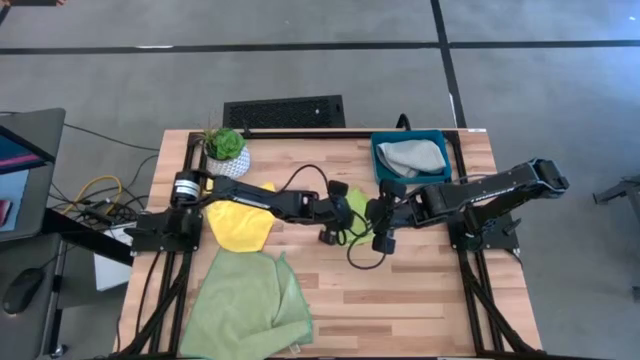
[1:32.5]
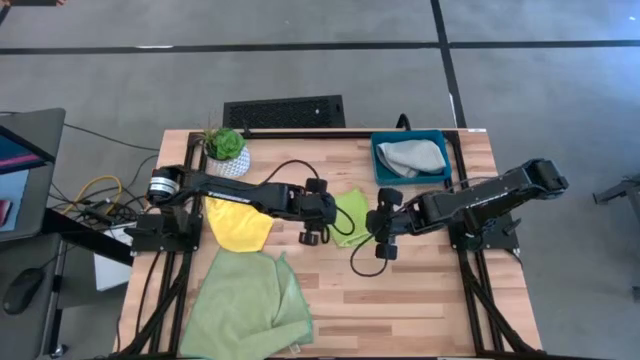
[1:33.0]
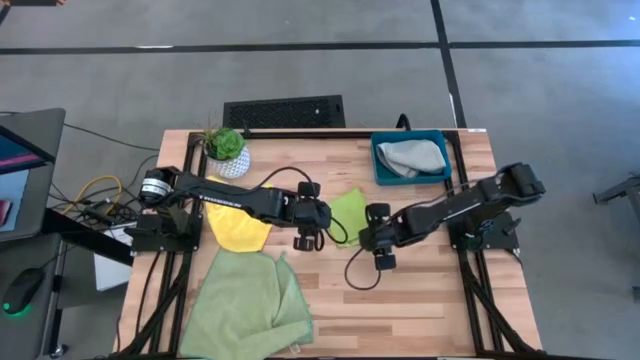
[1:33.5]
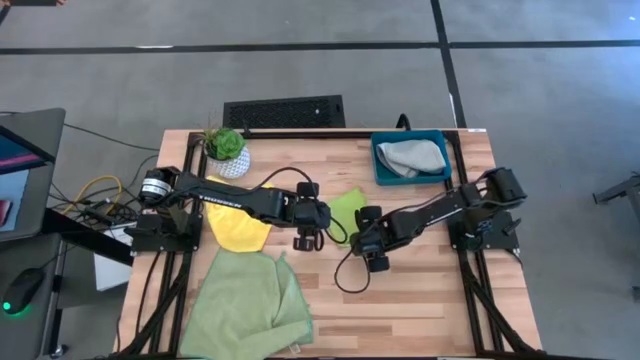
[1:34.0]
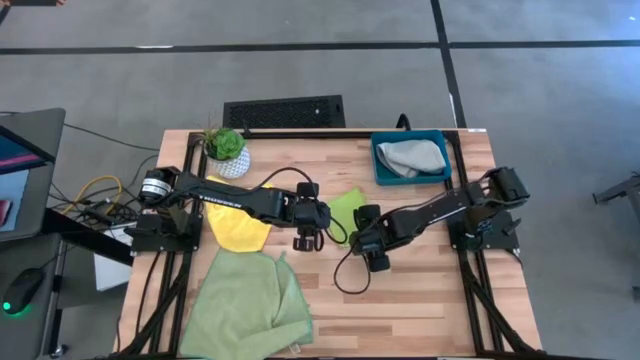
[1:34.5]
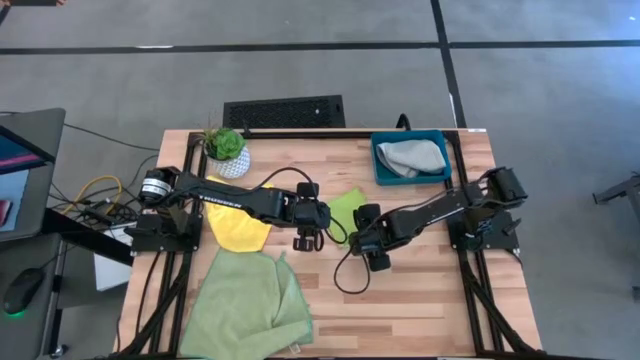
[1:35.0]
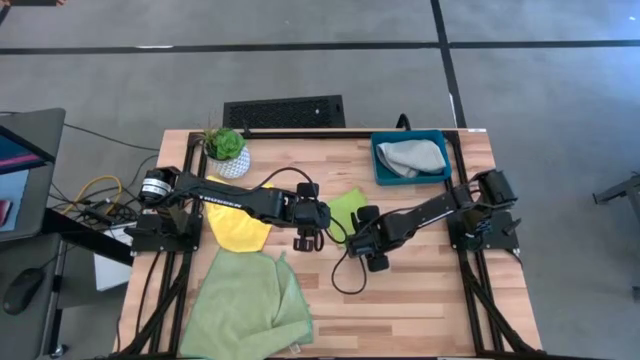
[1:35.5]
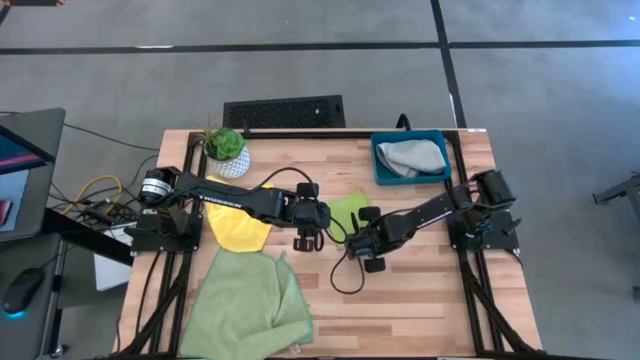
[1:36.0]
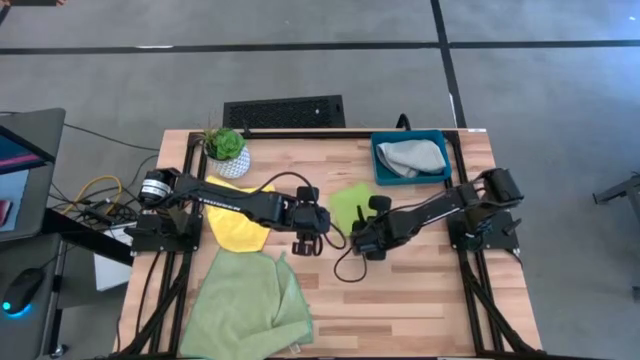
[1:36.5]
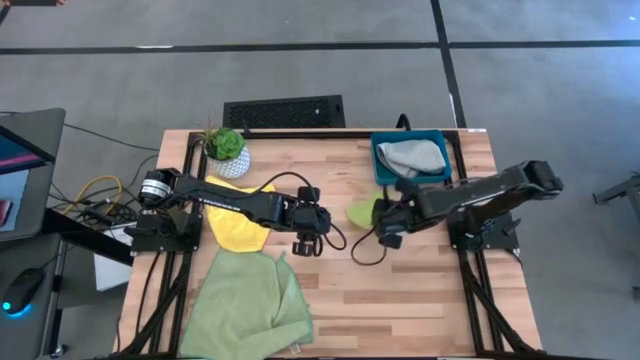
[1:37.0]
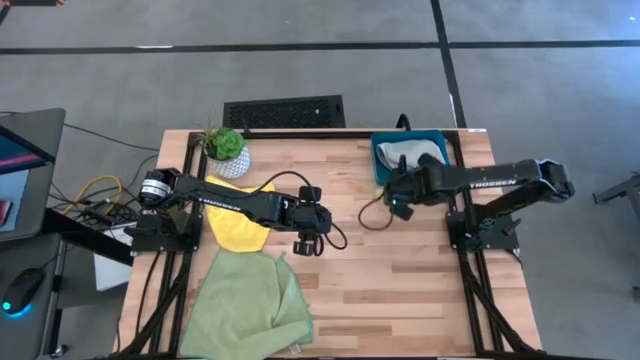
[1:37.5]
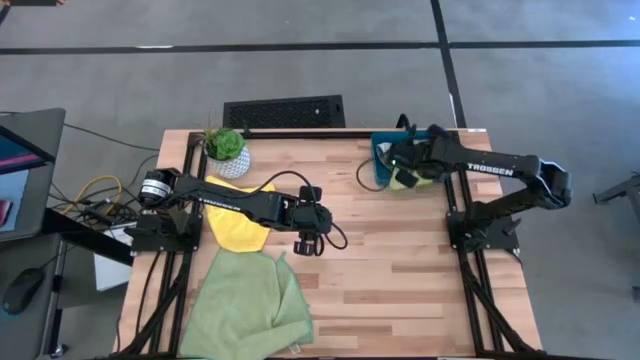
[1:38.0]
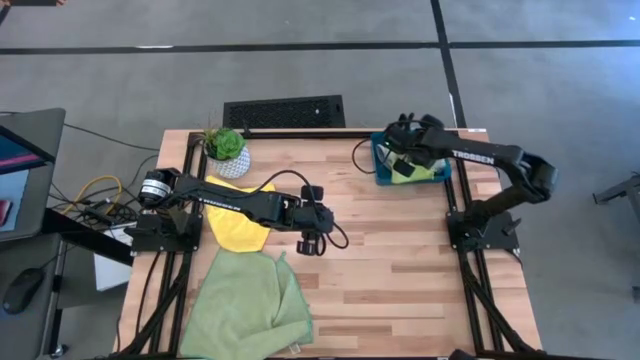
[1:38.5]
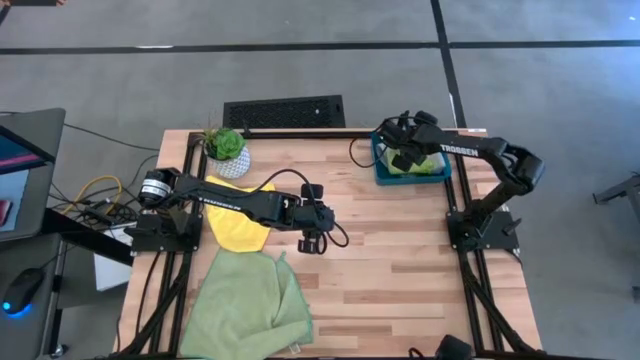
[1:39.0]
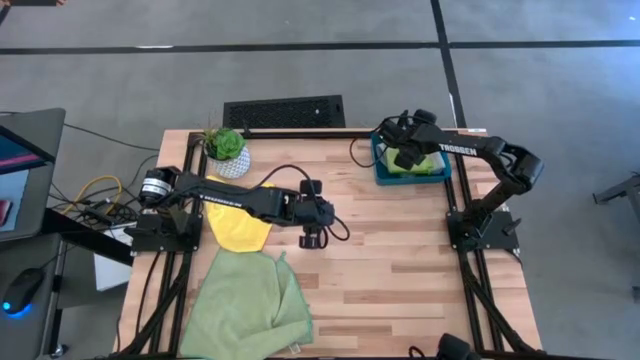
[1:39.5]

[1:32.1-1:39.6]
Task: Fold microfiber towels
Put the light green microfiber towel into the blue bin

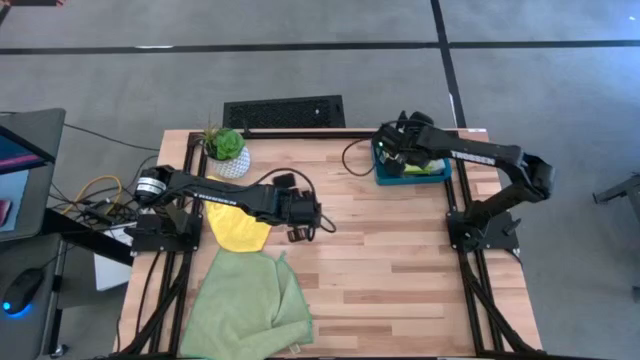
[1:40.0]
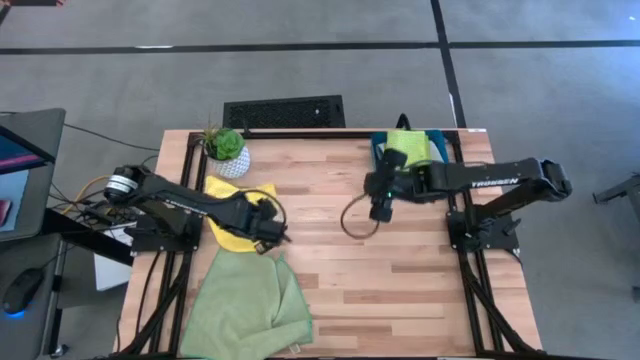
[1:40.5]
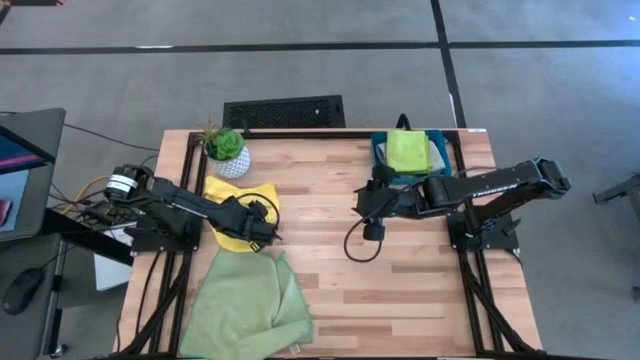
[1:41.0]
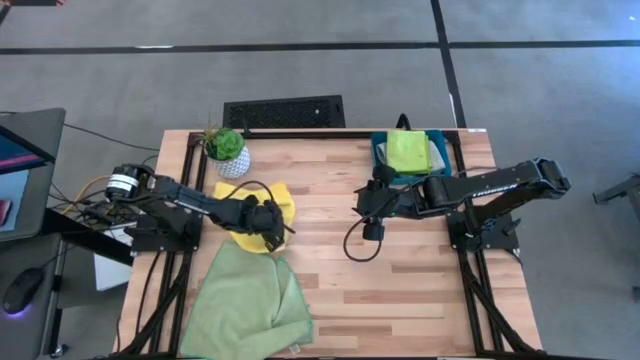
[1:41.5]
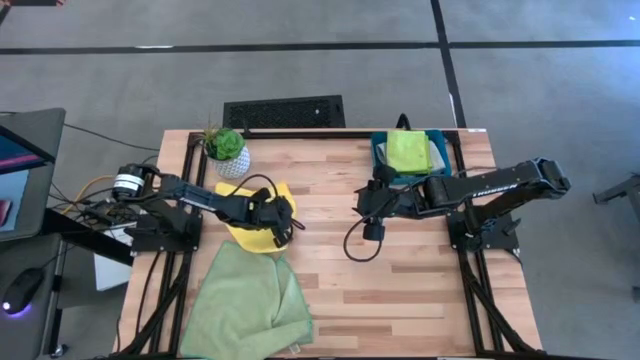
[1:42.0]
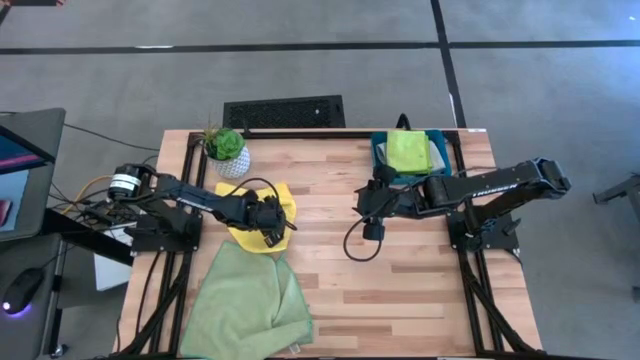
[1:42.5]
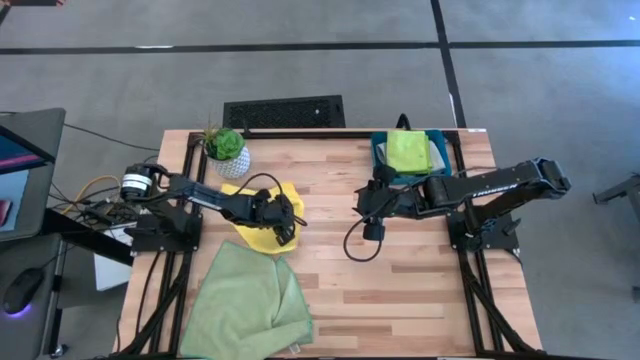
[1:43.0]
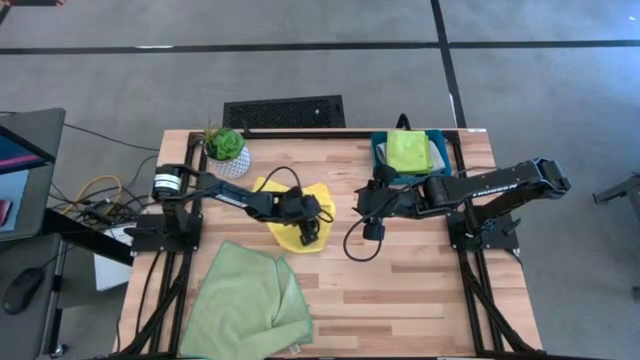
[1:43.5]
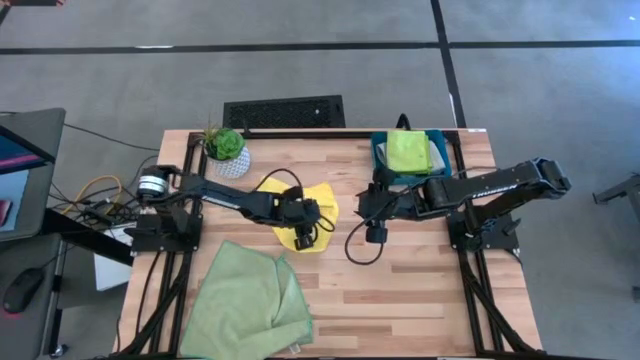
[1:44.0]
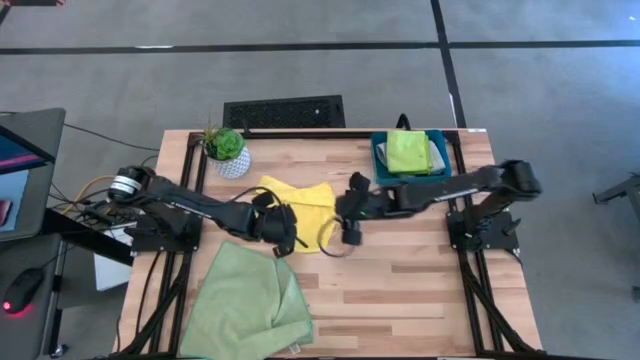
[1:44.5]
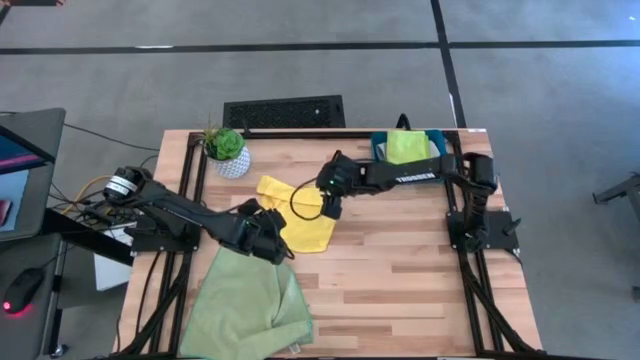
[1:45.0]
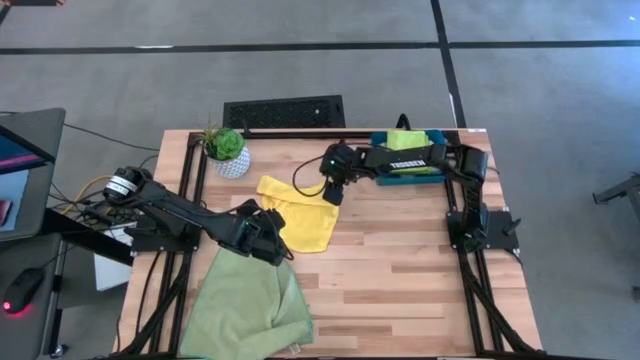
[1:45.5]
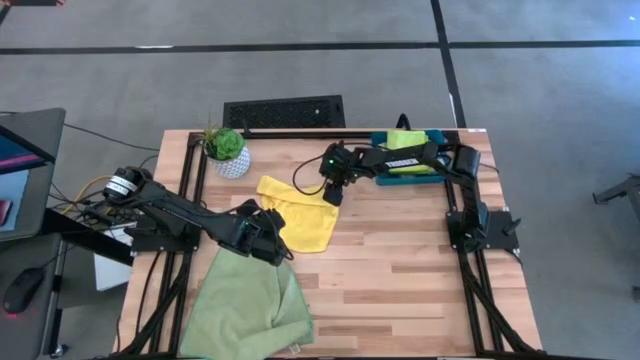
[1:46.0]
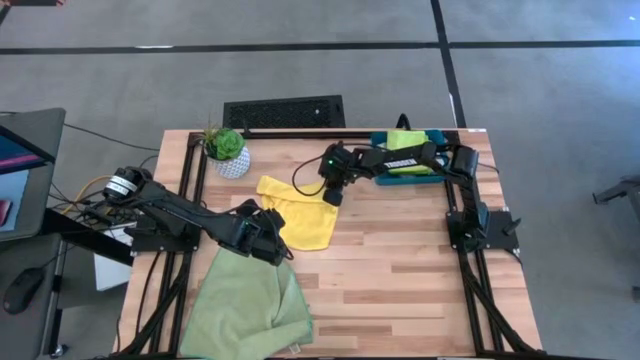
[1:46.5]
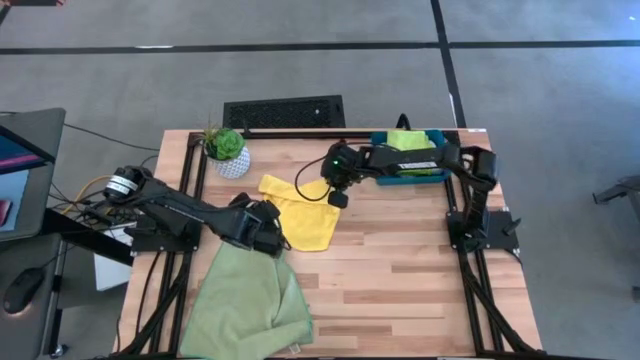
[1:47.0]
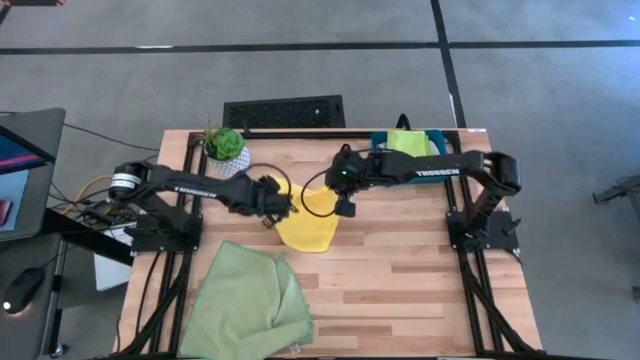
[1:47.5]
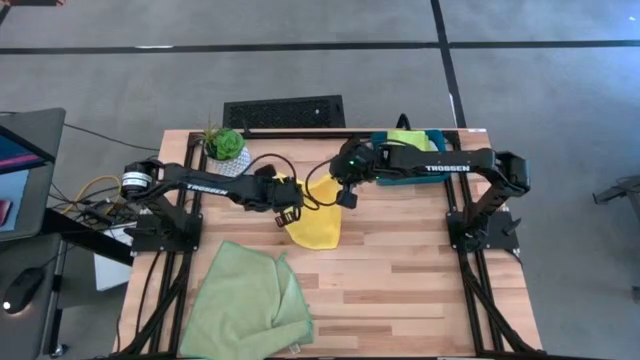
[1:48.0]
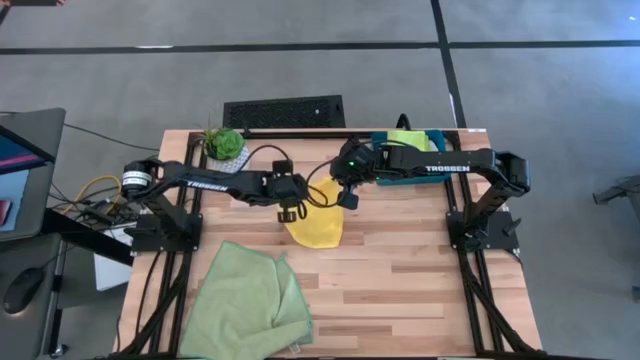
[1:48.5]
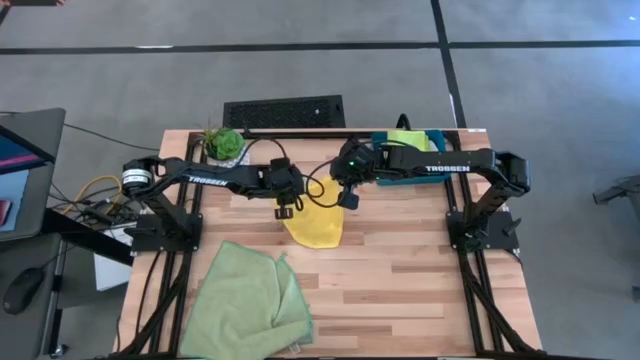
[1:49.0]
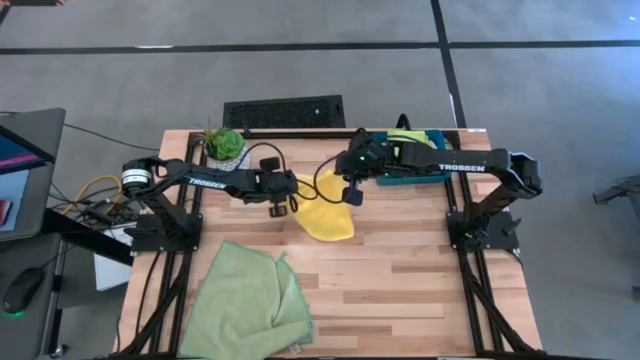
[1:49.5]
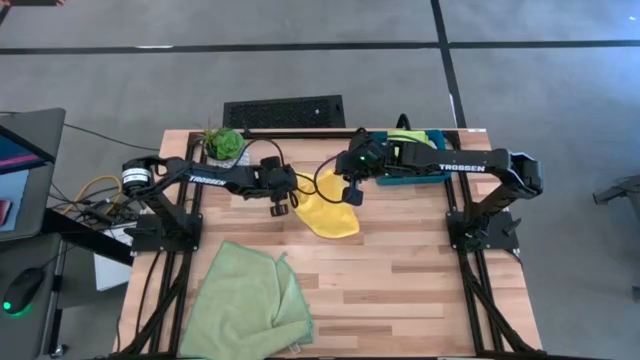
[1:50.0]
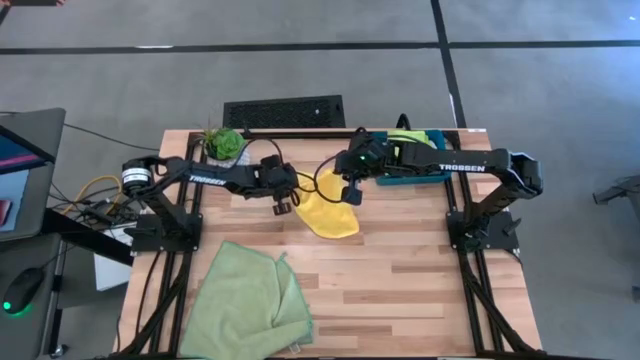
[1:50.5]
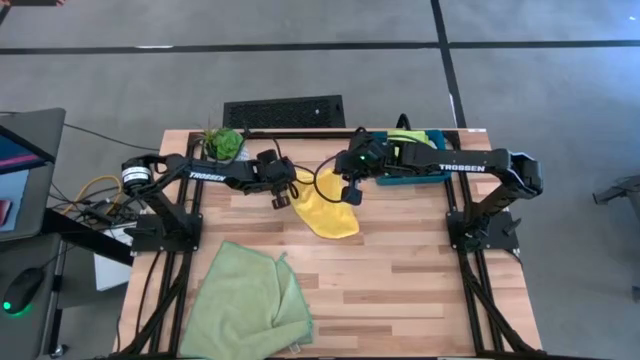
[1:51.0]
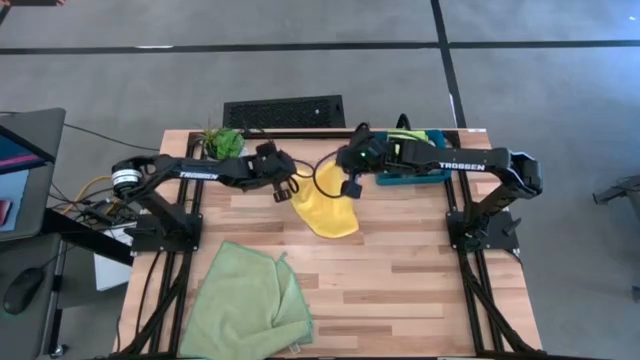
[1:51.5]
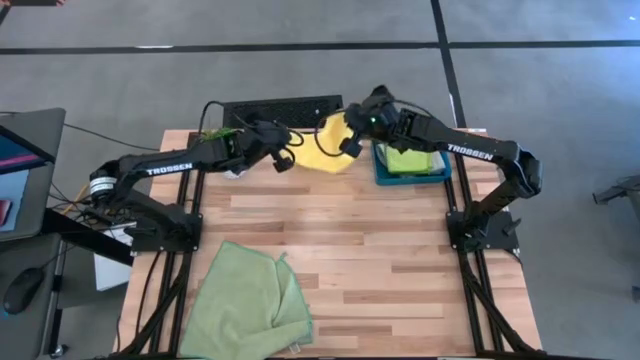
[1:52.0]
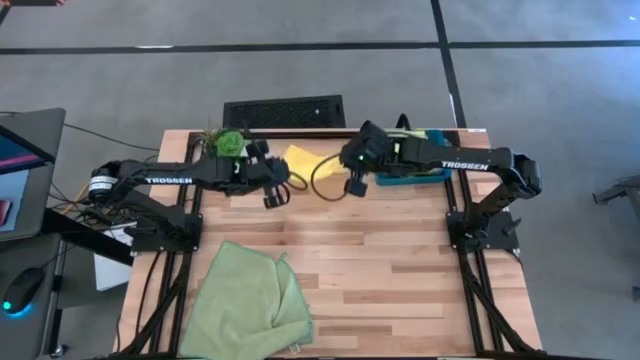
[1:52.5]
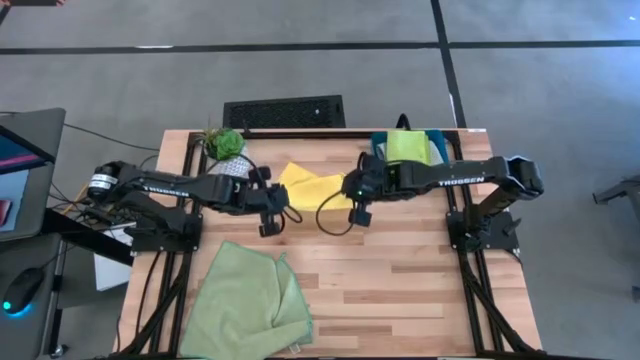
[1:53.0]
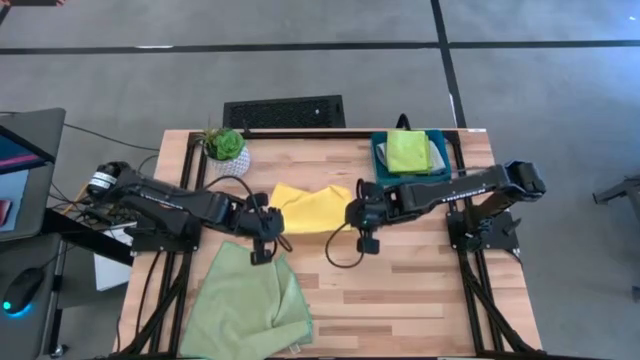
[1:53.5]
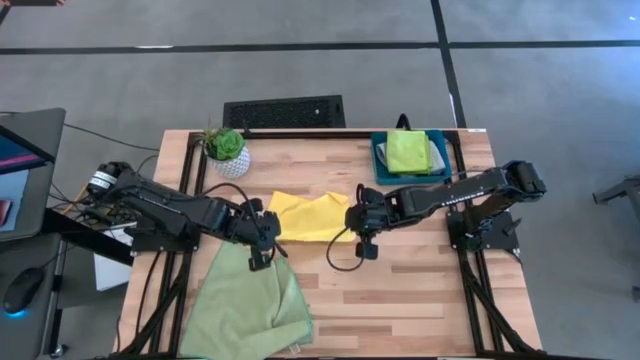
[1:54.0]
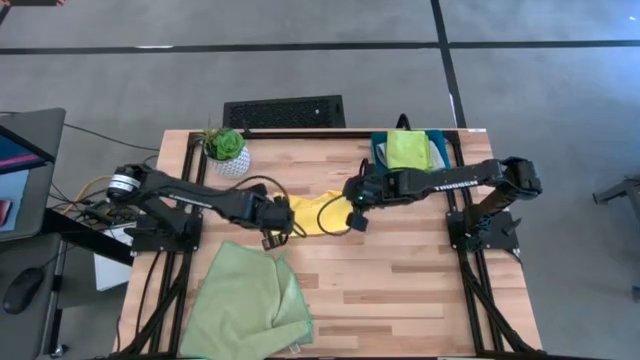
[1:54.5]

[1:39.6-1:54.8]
Fold the yellow microfiber towel
